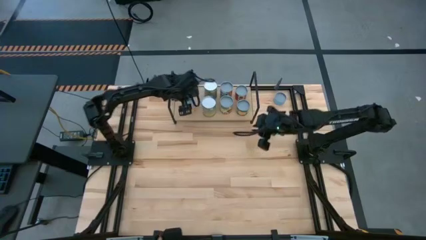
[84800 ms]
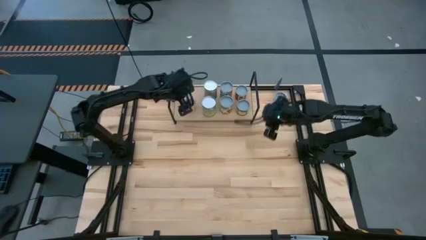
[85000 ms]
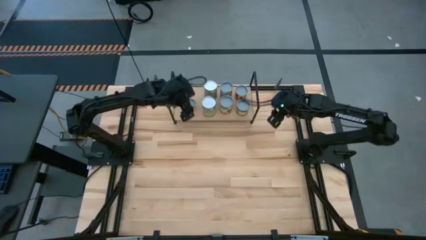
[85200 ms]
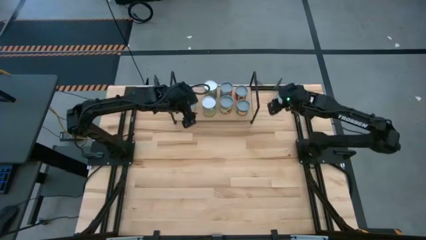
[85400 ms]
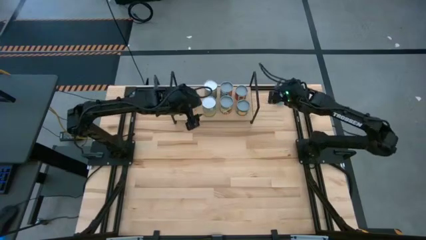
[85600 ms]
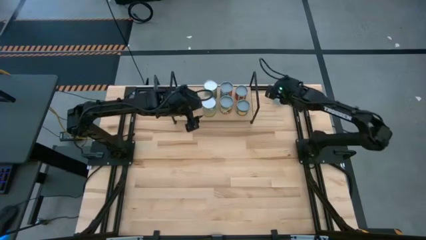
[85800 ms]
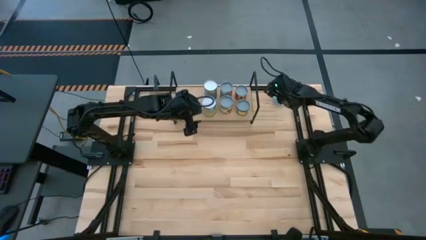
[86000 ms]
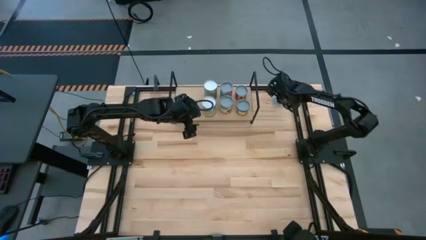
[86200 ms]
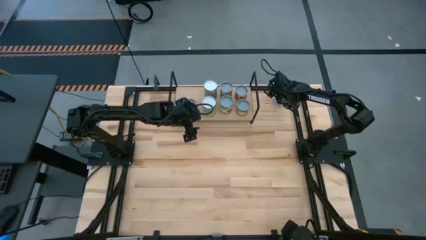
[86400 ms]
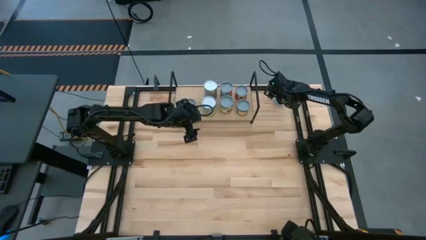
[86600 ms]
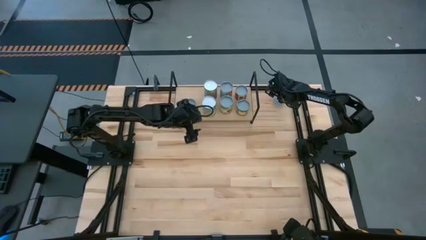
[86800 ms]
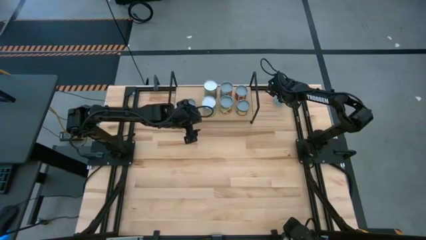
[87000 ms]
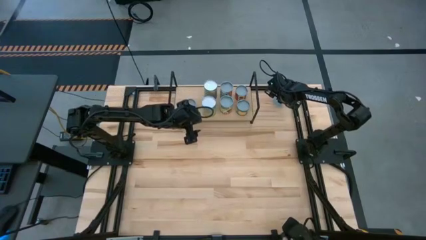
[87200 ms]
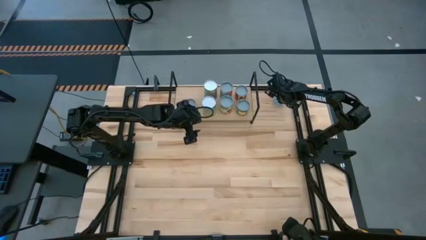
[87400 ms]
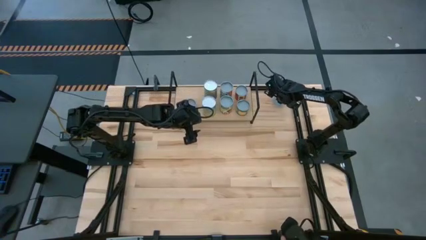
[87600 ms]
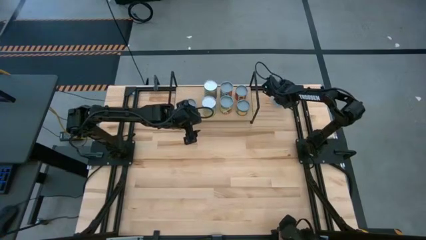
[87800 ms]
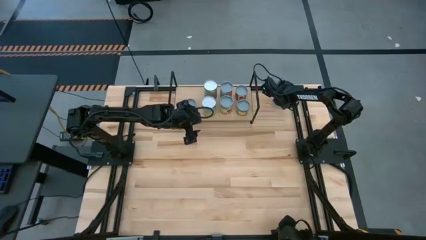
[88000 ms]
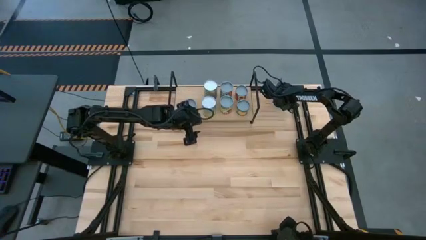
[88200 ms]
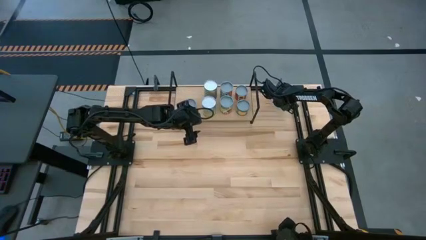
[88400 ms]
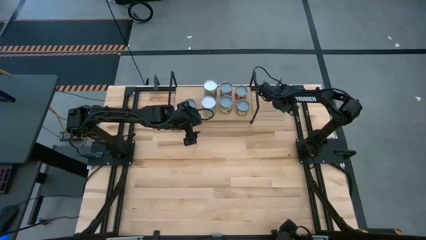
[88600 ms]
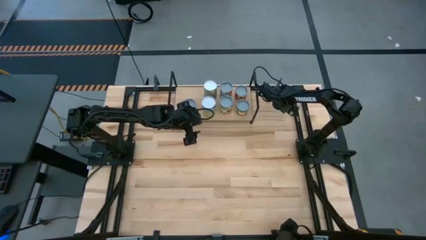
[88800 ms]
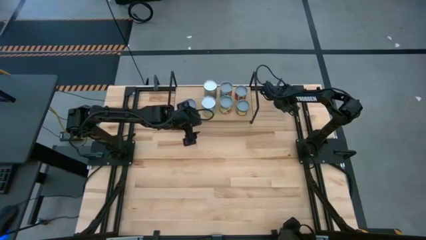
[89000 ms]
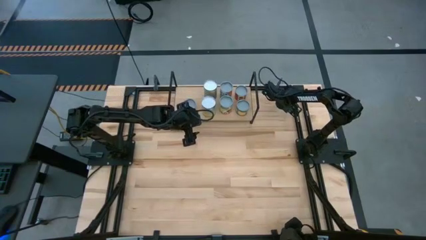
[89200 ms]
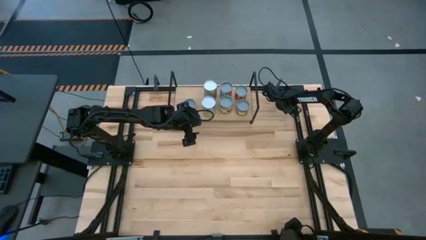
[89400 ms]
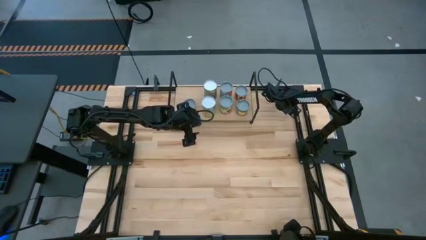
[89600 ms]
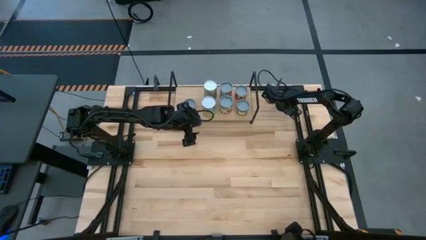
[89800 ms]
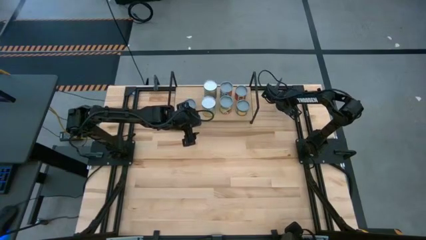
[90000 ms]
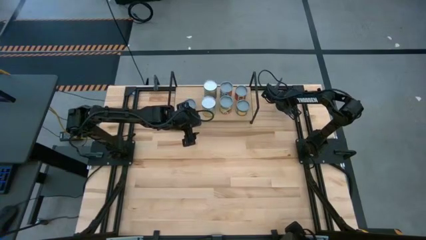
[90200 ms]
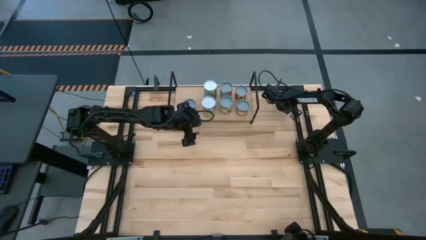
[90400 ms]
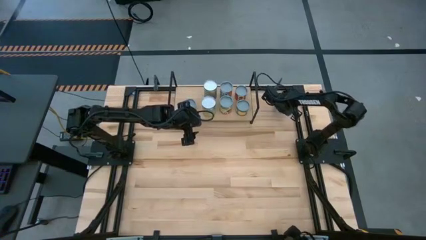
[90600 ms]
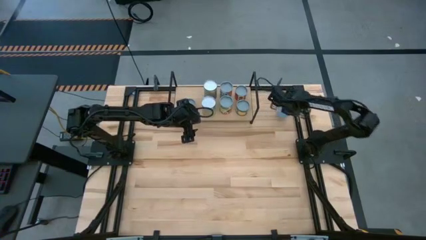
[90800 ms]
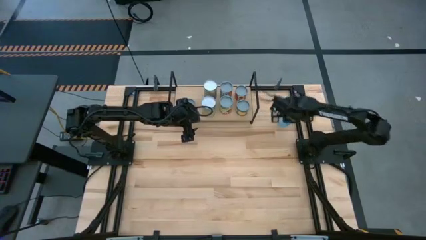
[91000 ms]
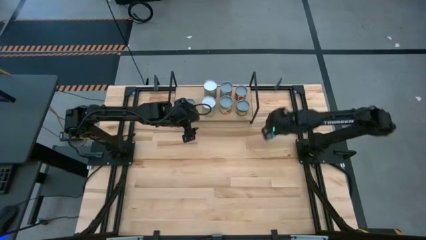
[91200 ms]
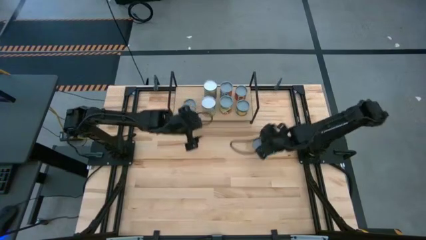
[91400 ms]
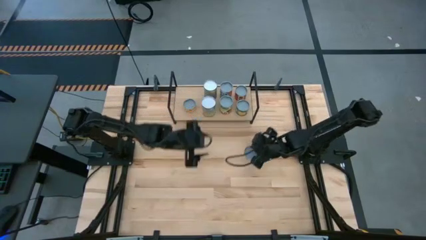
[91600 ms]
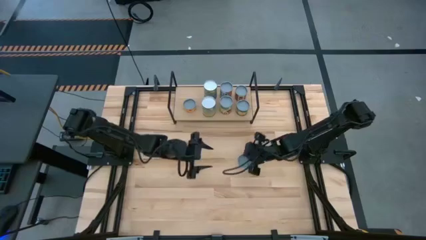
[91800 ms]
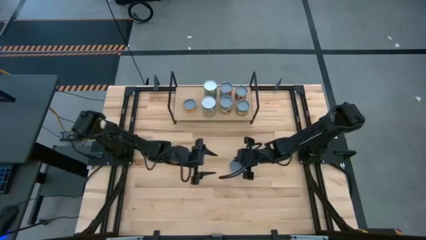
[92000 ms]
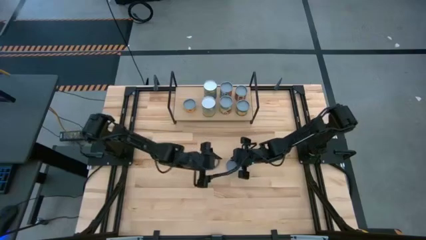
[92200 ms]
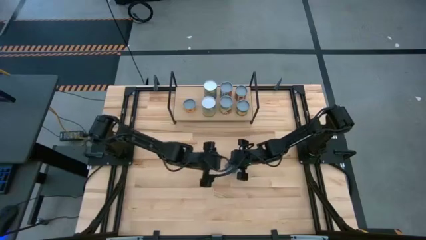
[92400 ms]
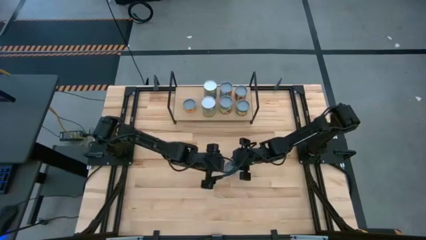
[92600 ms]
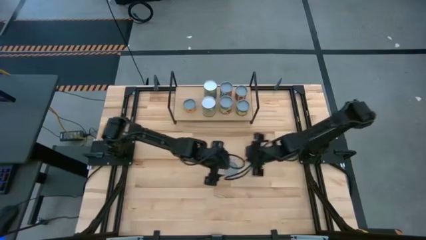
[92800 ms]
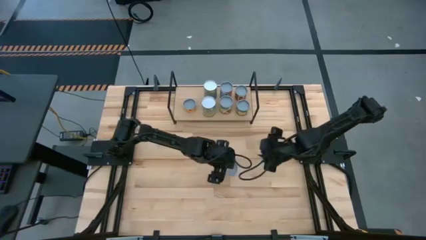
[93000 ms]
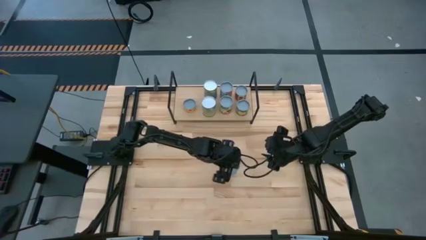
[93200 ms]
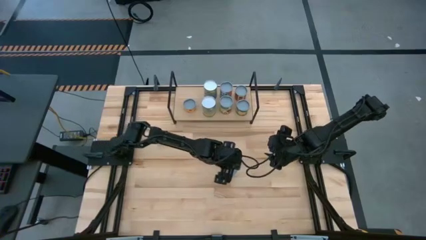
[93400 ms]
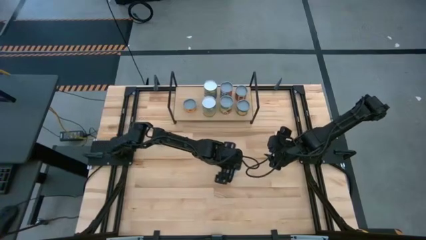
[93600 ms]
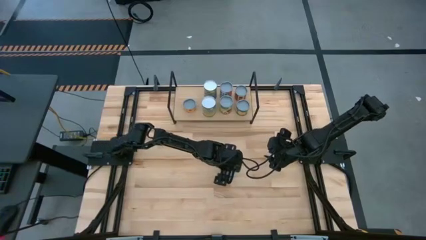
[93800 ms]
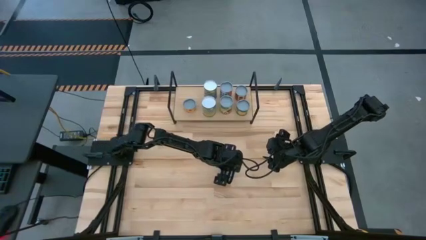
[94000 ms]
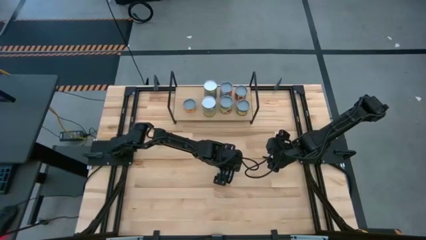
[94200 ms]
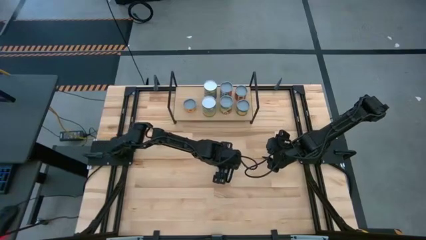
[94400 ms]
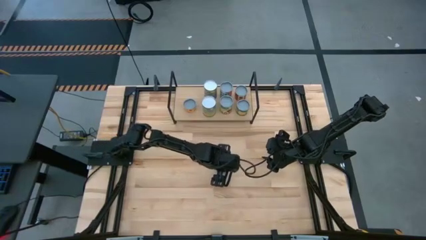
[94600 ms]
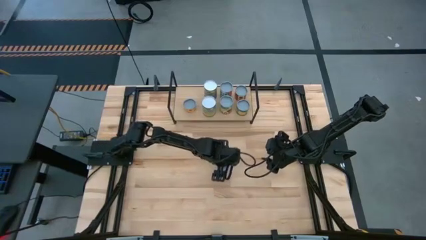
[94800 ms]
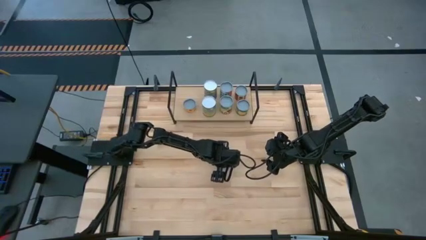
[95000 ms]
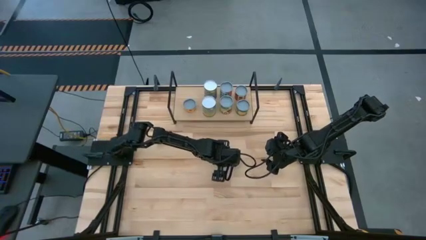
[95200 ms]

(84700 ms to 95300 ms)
Task: Pick and place cans onto a shelf
Put the canned salmon on the shelf

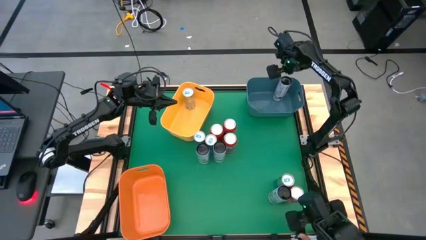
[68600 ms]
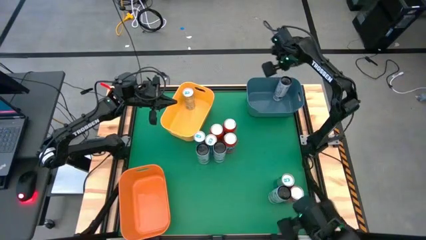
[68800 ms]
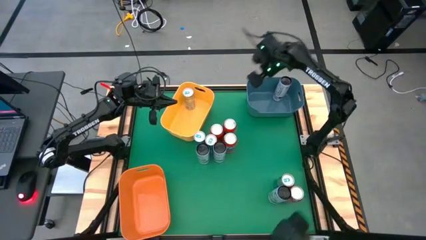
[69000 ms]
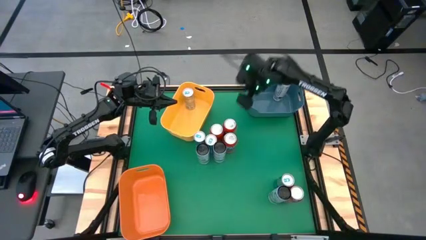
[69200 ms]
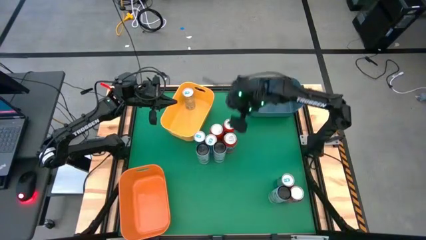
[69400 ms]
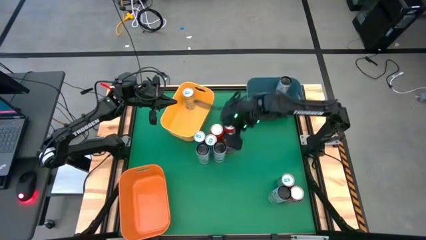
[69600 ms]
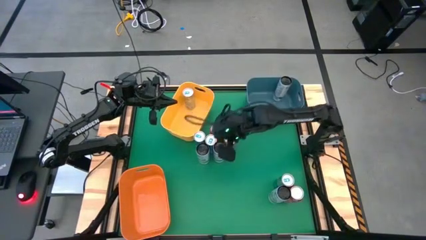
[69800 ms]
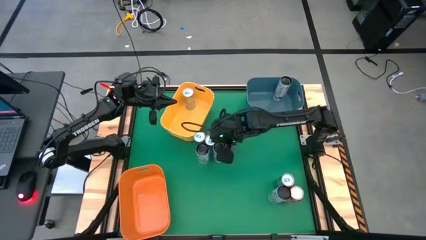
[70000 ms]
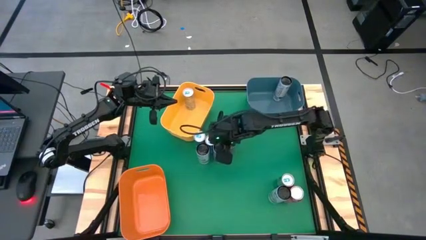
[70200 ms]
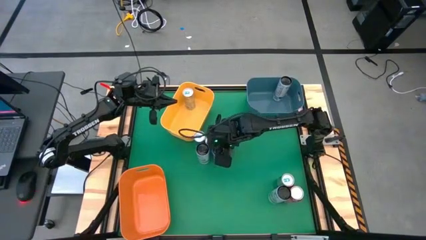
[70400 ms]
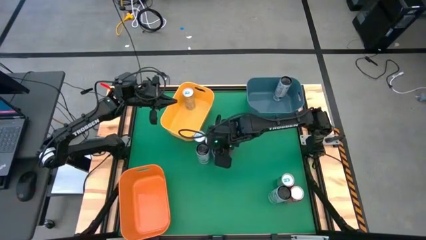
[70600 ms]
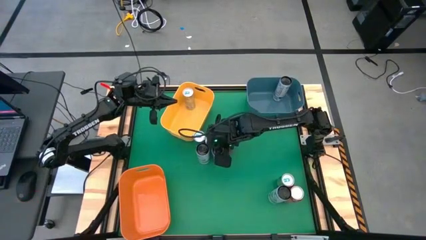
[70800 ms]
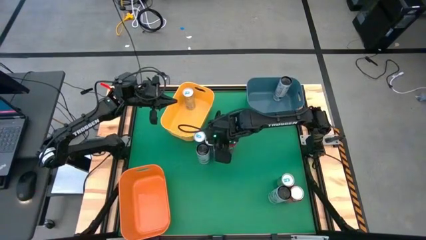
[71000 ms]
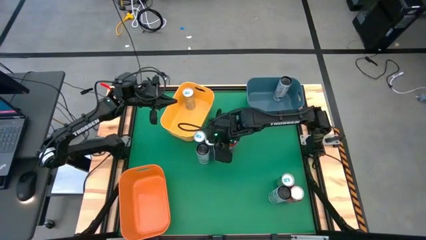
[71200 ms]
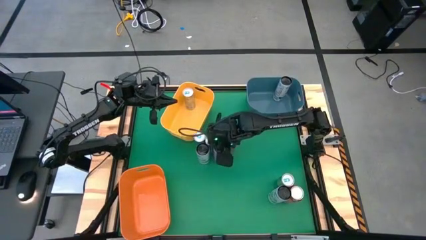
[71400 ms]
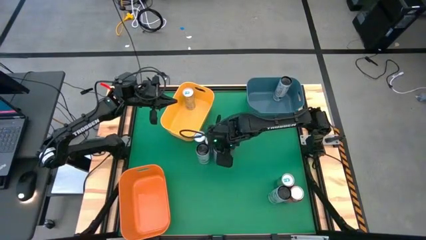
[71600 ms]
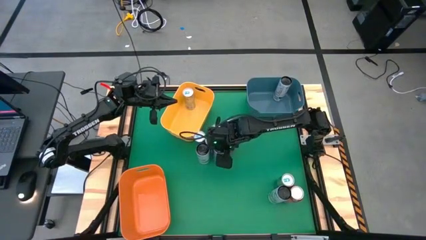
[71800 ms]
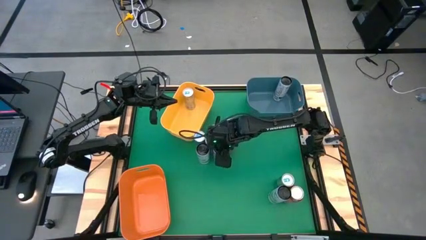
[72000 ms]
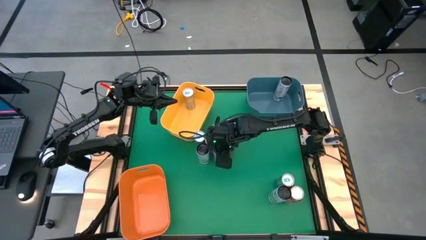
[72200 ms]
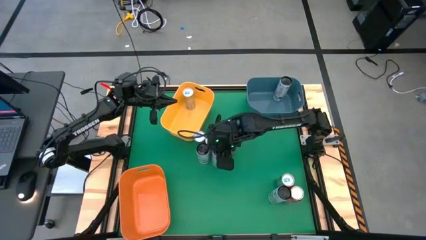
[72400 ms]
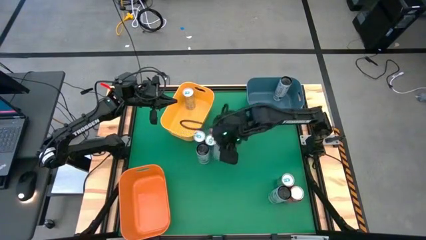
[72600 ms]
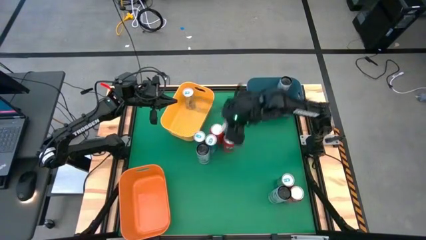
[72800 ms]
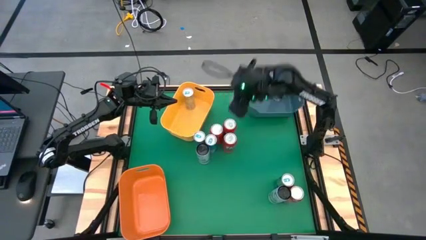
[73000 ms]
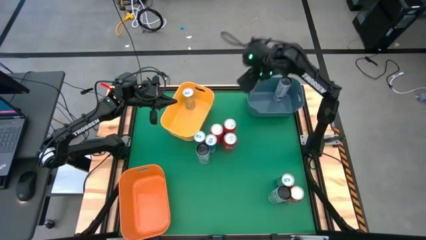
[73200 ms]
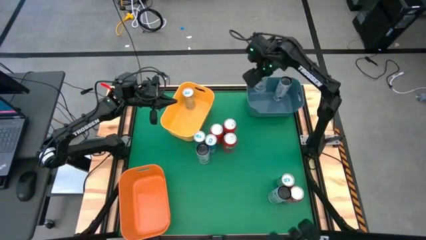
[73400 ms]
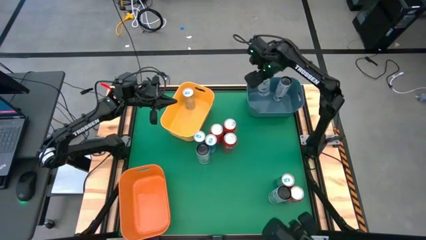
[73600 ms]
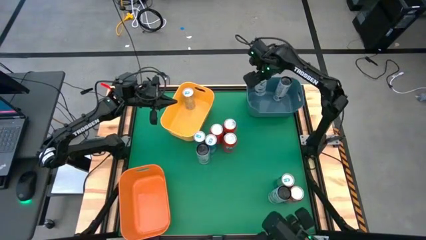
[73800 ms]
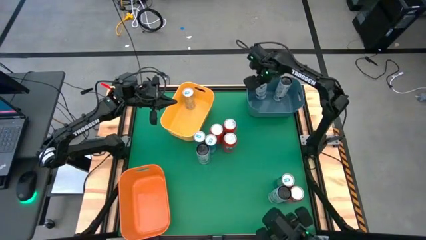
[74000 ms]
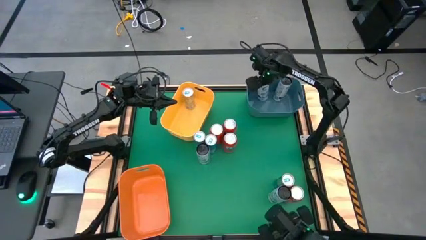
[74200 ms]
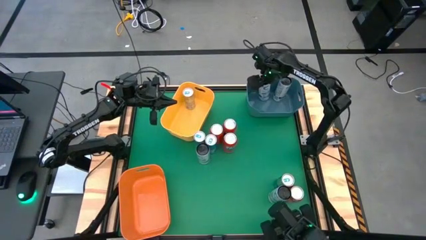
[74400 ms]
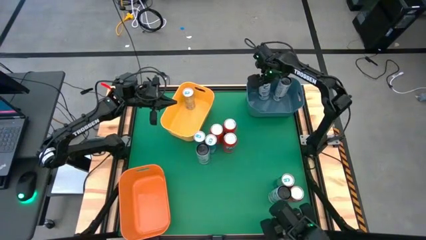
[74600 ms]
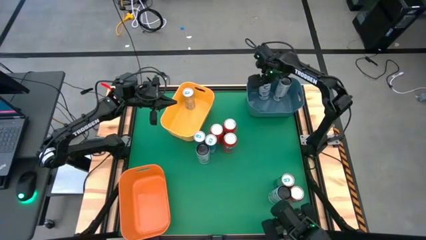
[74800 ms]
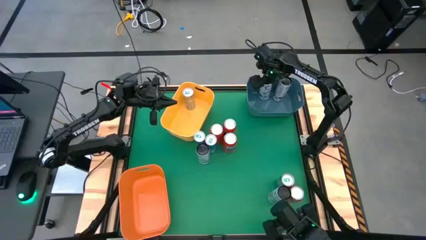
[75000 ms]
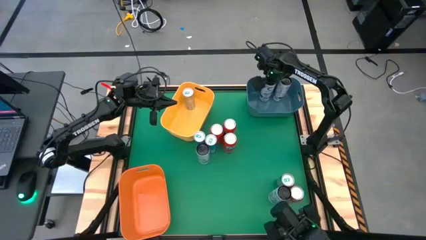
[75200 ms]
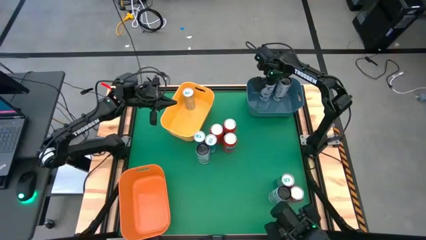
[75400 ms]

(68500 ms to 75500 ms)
Task: Sort soda cans
Put the white blue soda can into the blue bin
